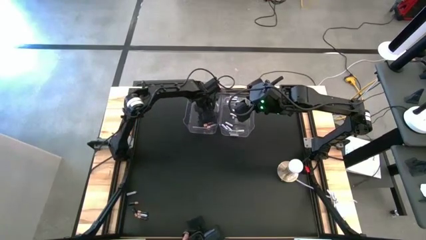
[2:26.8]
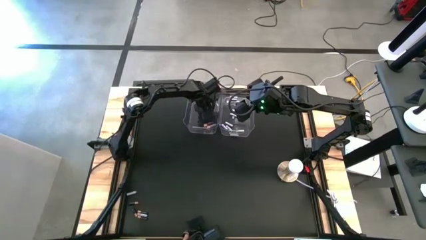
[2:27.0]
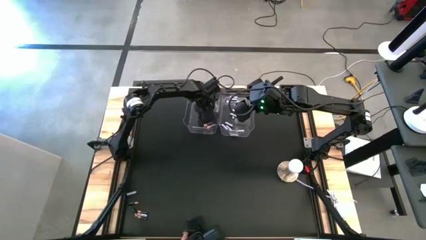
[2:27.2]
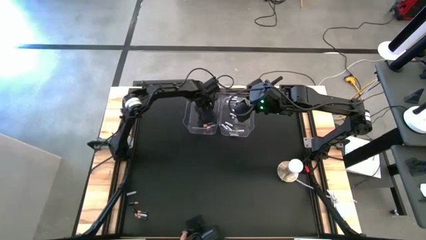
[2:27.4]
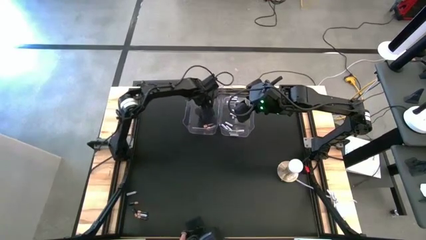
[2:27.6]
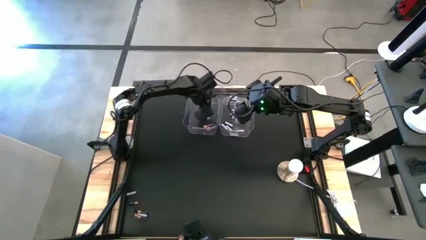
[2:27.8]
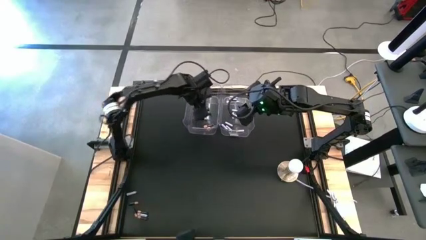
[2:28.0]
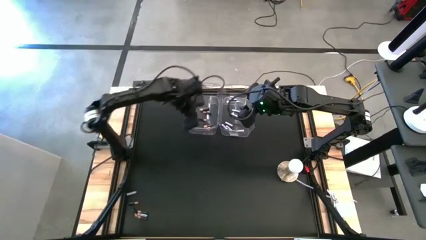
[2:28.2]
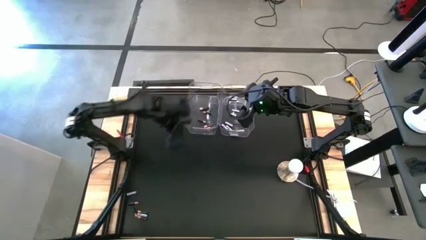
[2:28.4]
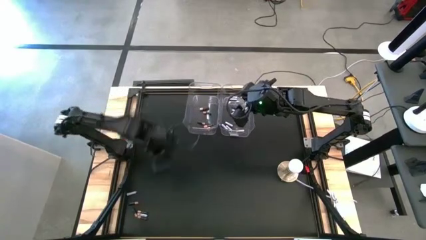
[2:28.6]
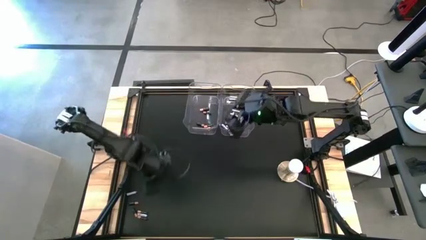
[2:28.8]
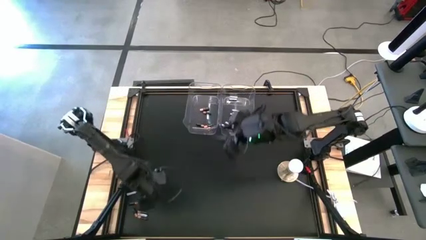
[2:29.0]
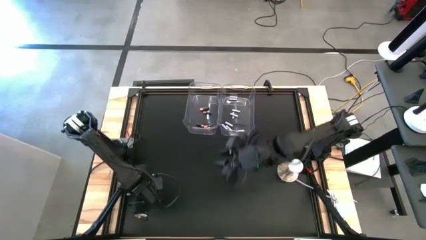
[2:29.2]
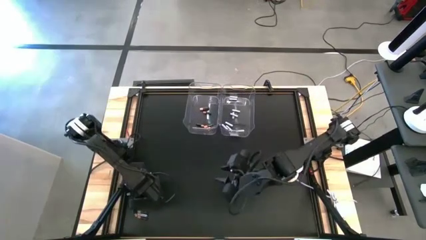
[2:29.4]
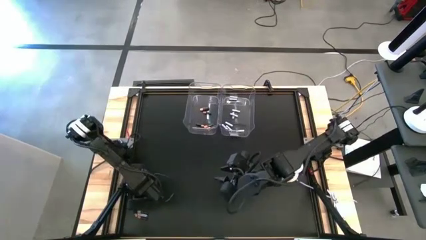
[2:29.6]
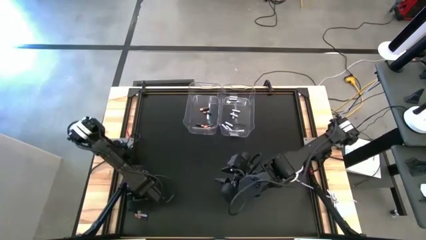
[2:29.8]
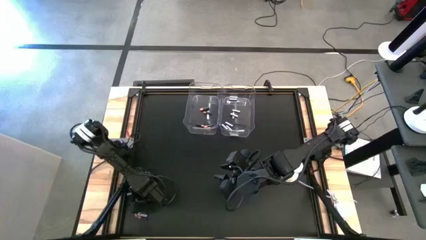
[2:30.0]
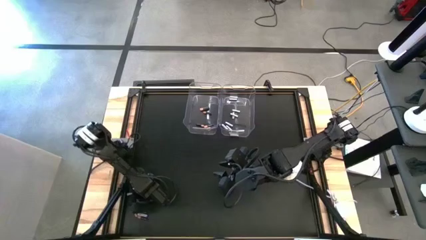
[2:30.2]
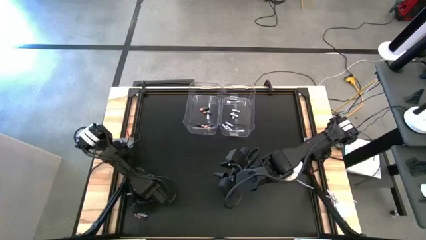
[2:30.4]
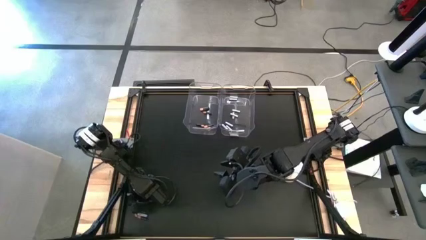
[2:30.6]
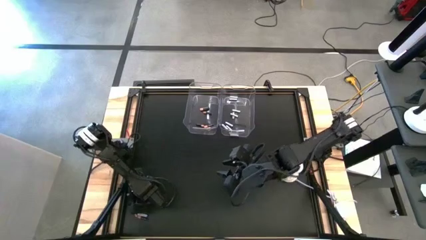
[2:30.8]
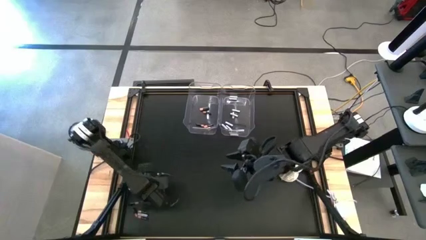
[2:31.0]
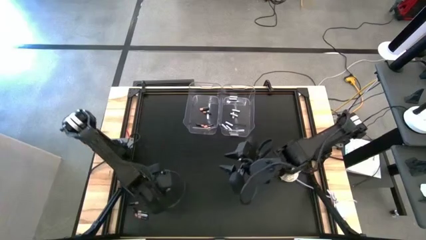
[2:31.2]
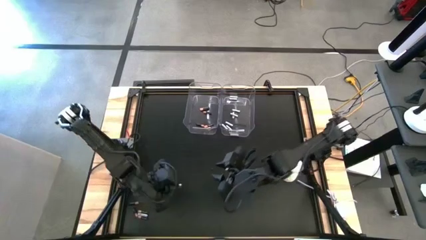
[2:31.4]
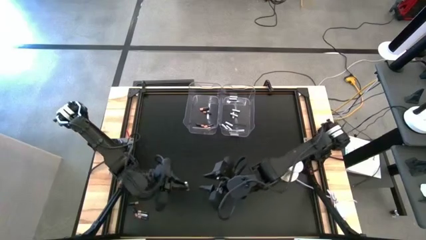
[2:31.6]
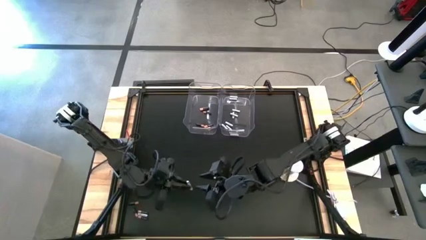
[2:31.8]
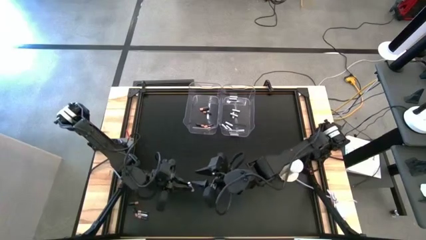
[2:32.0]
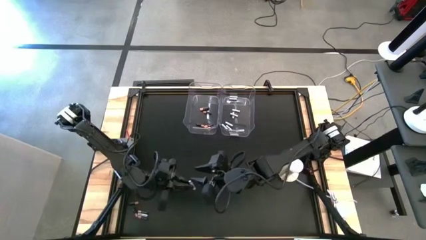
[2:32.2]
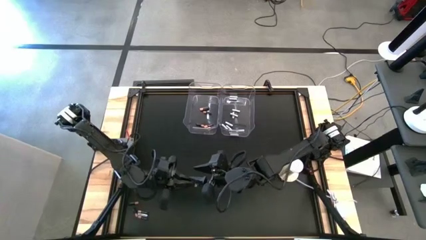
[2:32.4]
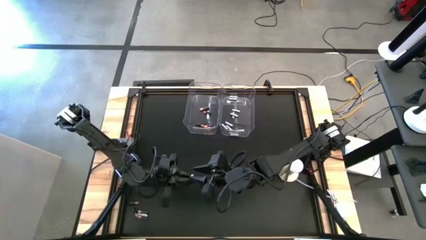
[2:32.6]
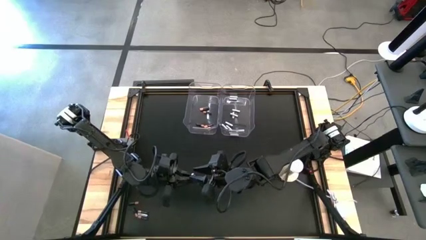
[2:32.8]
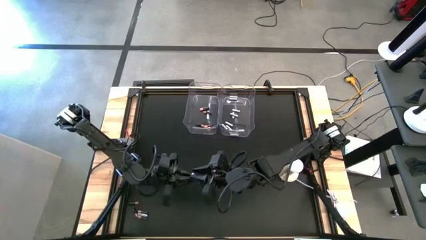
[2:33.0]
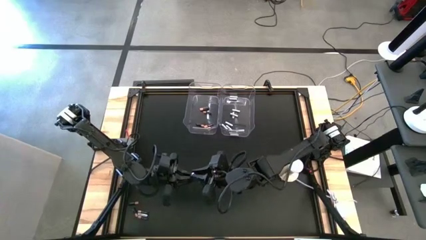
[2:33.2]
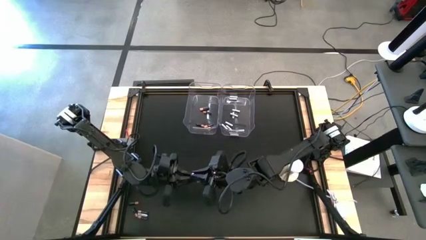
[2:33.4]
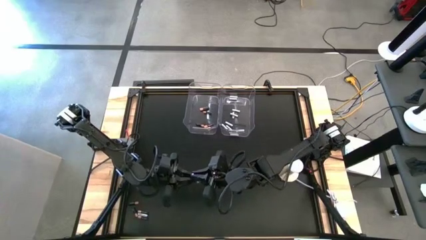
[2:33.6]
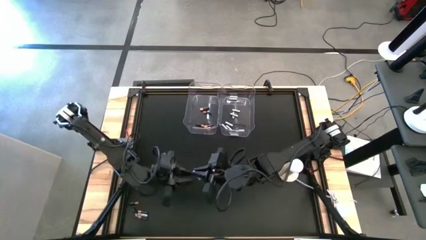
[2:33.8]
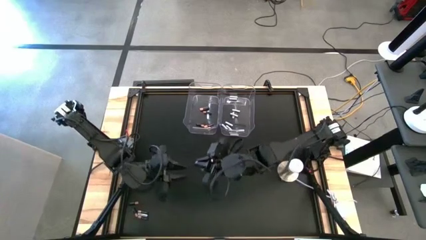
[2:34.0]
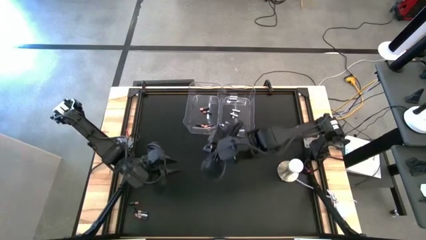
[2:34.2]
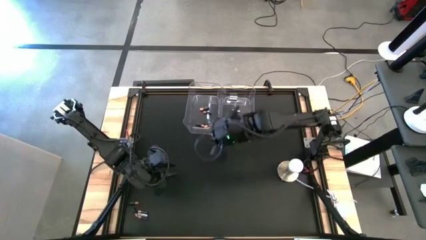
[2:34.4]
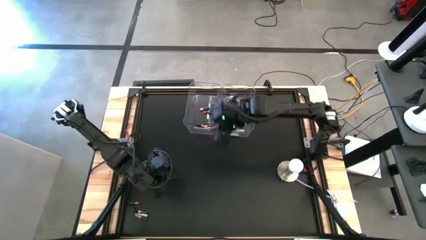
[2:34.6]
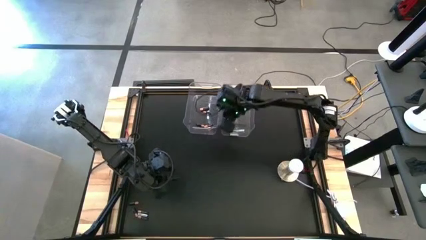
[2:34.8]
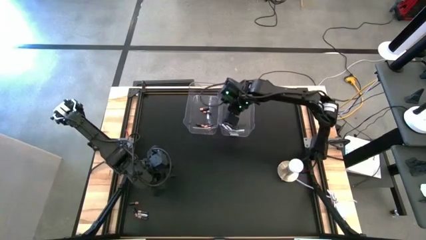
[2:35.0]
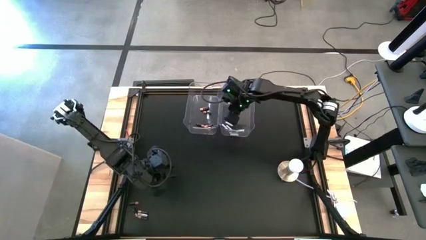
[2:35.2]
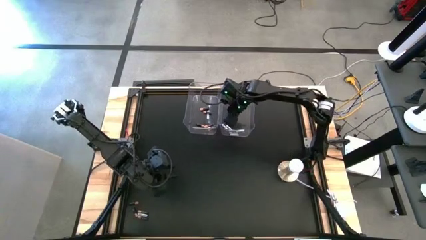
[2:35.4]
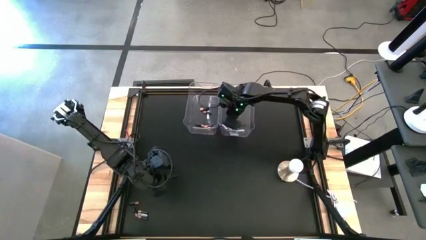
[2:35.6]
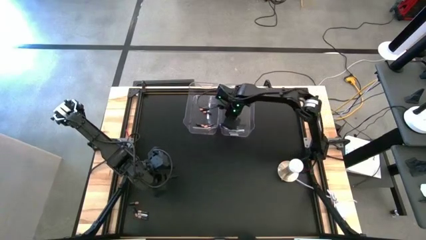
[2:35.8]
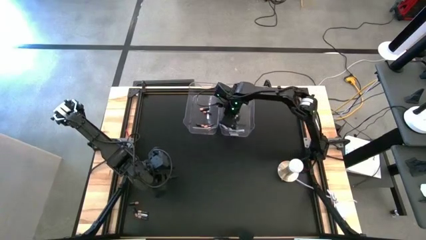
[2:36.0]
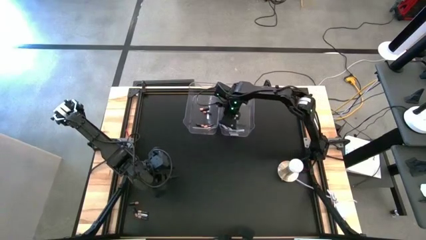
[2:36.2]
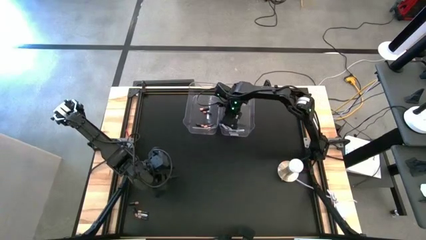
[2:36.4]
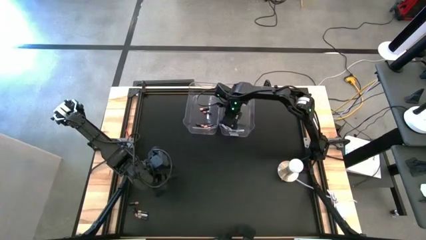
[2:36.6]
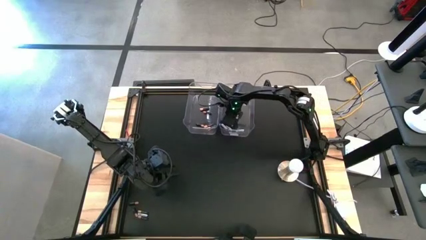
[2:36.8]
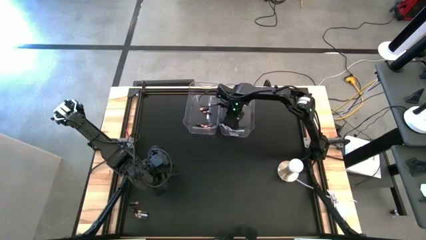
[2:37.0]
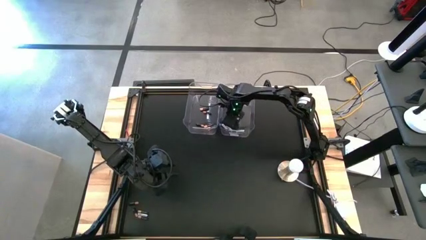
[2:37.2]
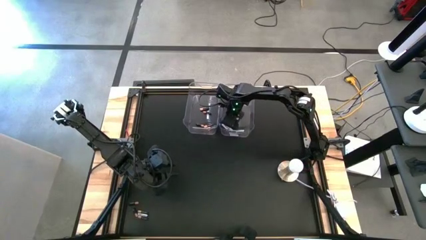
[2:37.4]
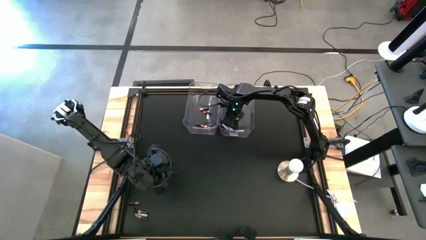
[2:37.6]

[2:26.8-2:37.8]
Task: Sort batteries
Put the white battery into the right transparent bin

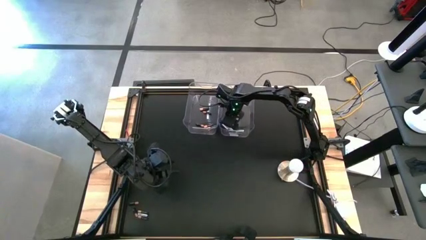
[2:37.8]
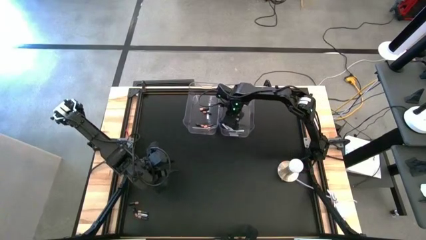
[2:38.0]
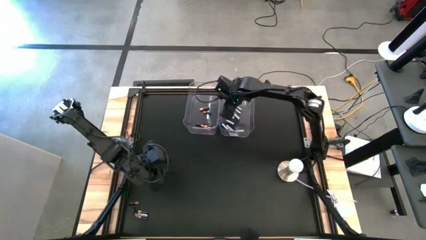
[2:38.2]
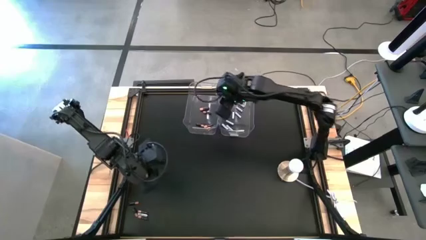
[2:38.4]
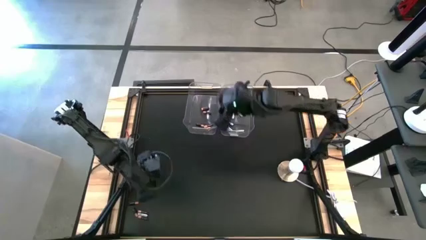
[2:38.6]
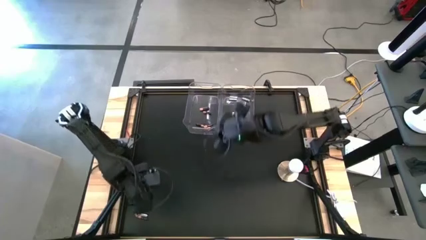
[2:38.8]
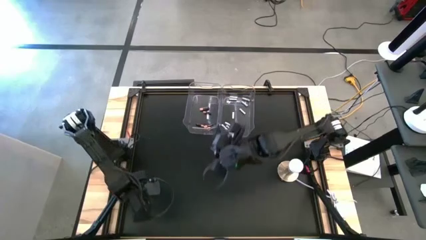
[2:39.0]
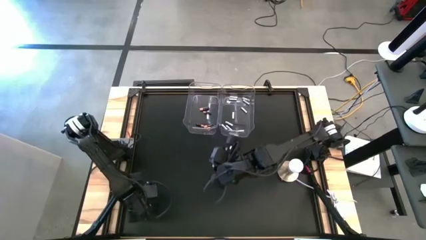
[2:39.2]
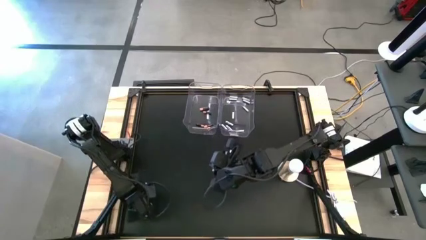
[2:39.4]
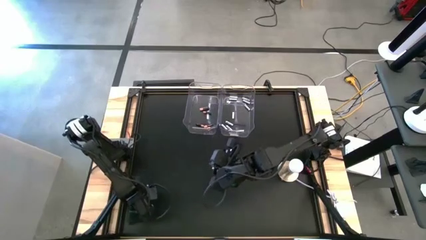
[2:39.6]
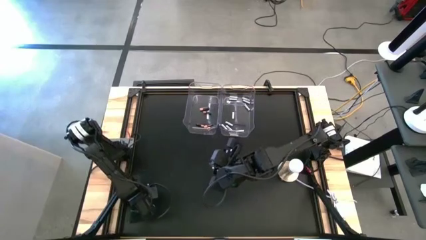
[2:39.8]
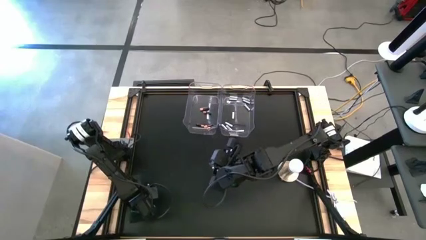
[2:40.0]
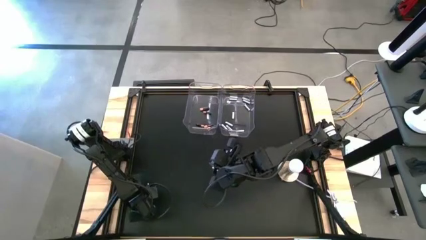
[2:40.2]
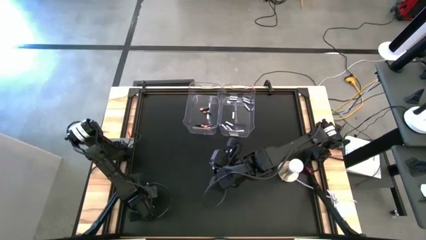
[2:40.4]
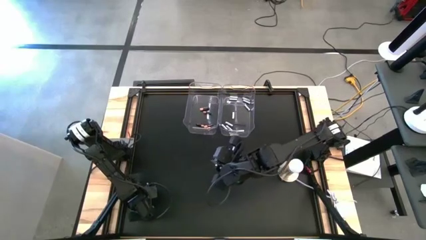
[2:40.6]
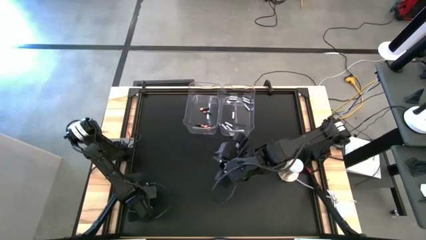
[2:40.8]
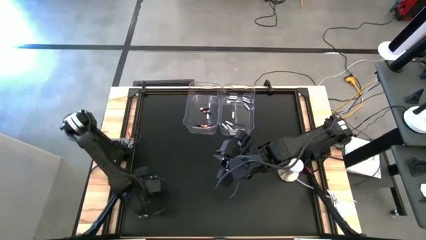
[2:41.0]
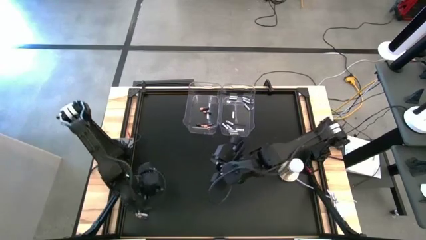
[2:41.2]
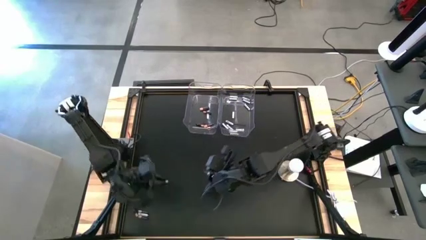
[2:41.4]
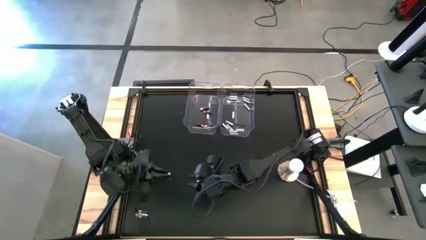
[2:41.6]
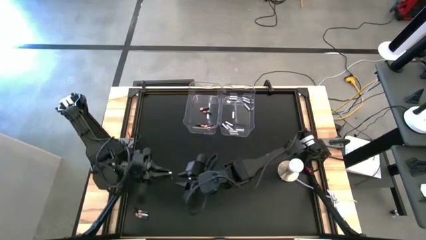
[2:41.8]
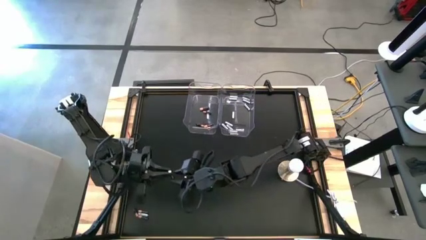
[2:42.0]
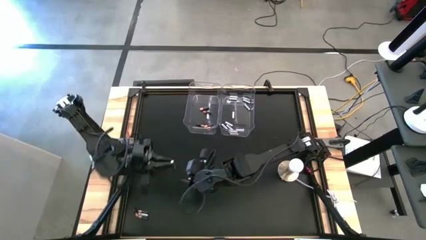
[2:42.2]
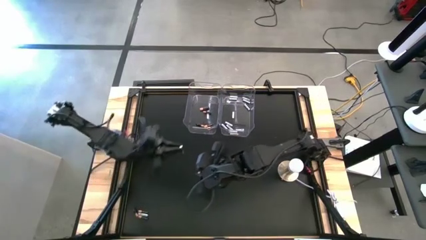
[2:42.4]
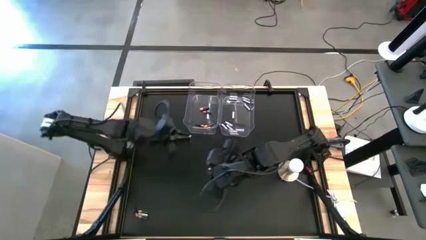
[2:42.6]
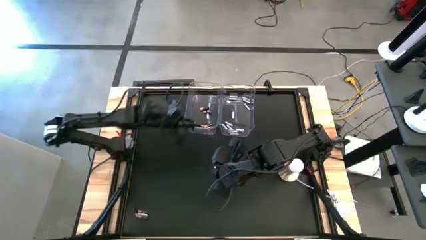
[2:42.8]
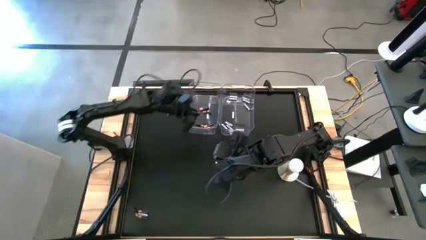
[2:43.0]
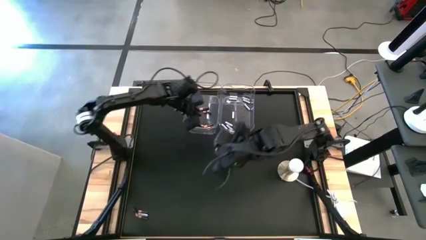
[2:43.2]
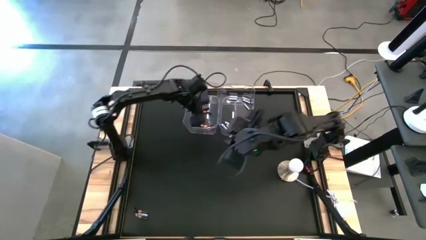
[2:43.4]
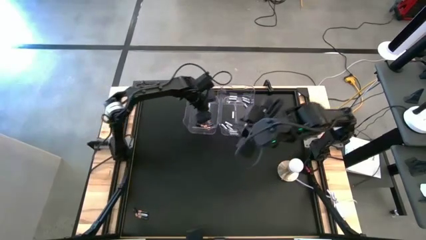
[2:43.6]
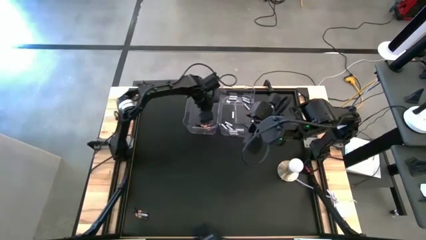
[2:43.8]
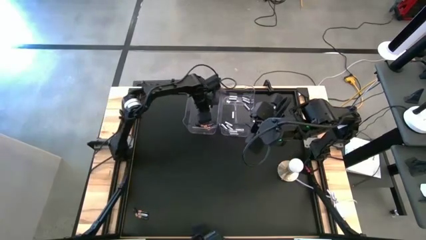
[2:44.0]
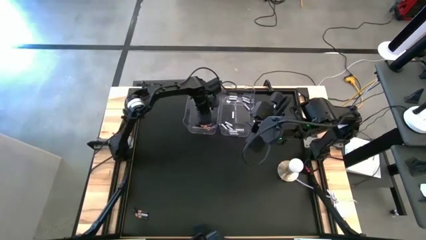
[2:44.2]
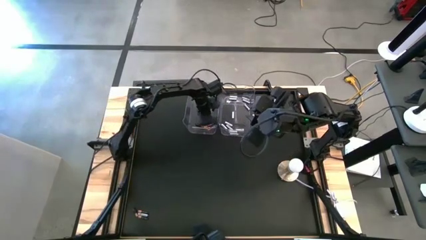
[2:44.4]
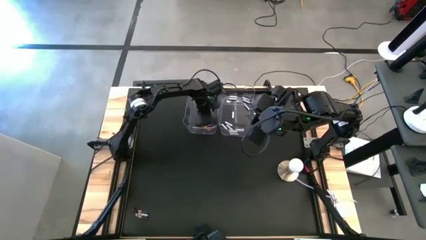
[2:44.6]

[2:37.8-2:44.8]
Put the black battery into the left transparent bin
